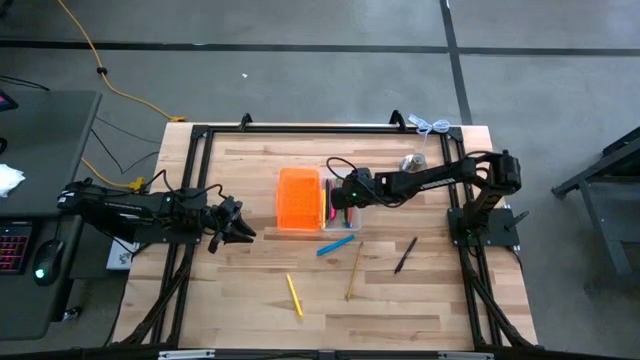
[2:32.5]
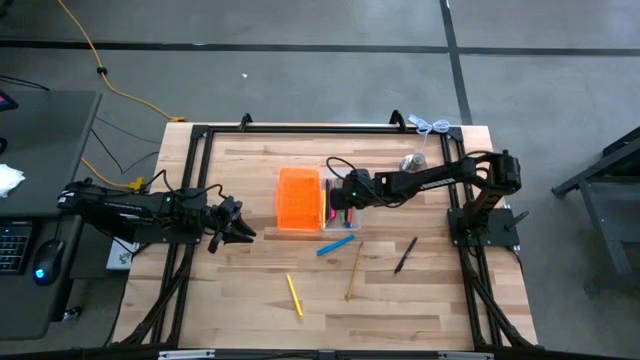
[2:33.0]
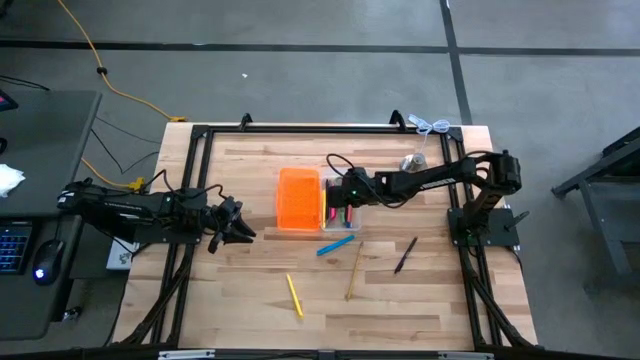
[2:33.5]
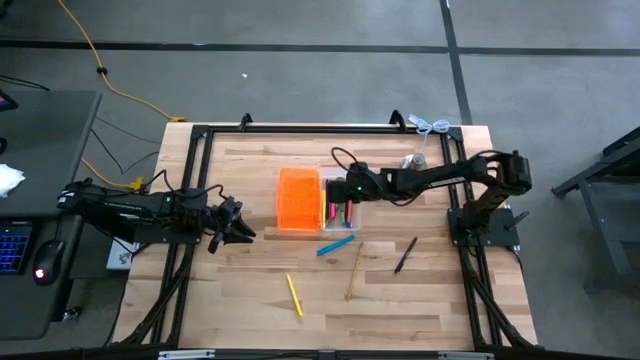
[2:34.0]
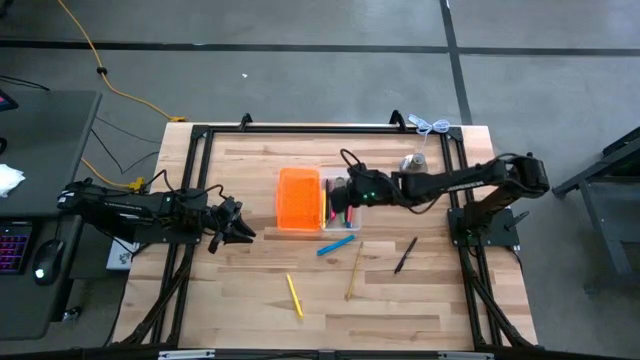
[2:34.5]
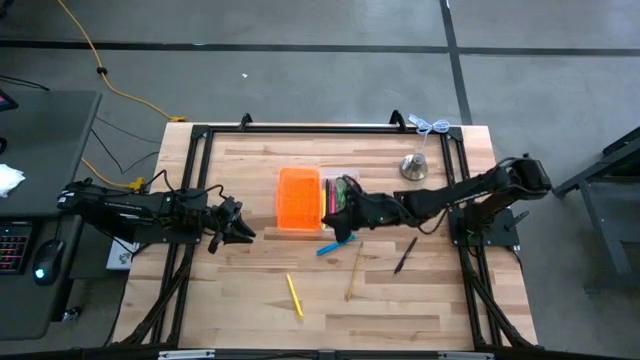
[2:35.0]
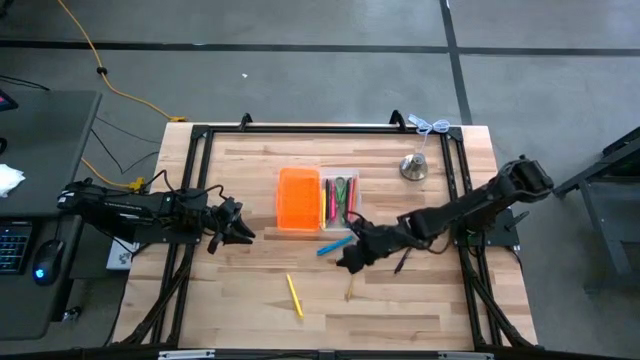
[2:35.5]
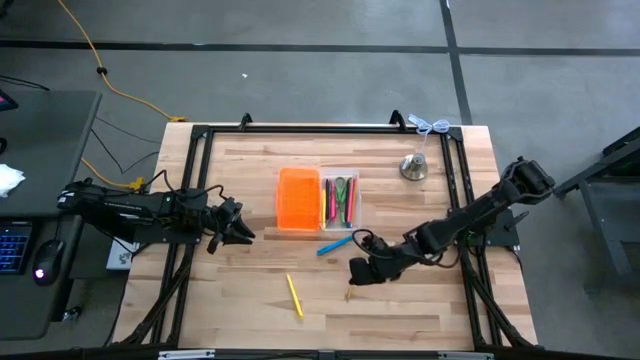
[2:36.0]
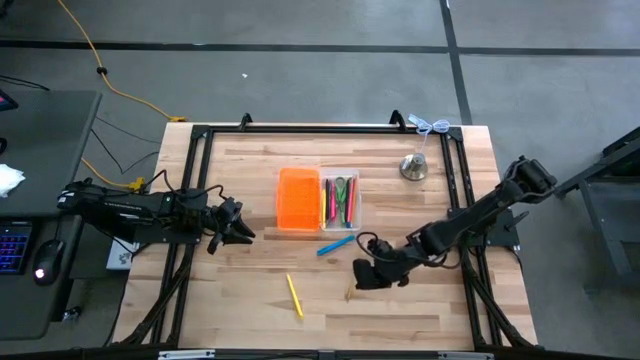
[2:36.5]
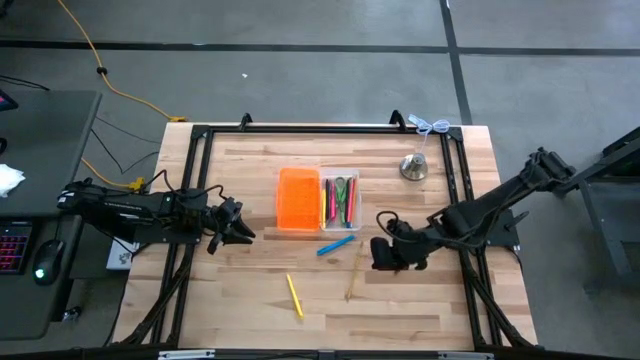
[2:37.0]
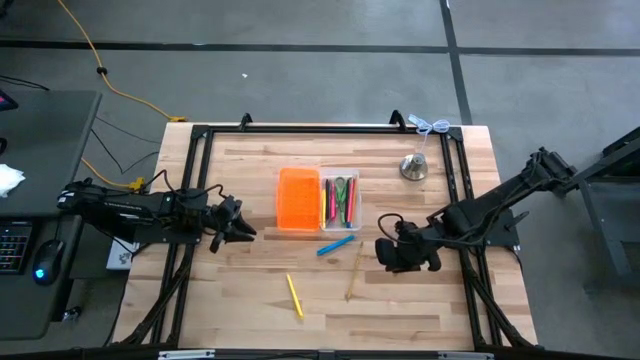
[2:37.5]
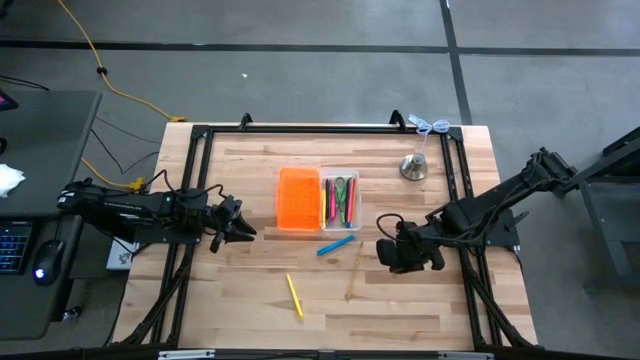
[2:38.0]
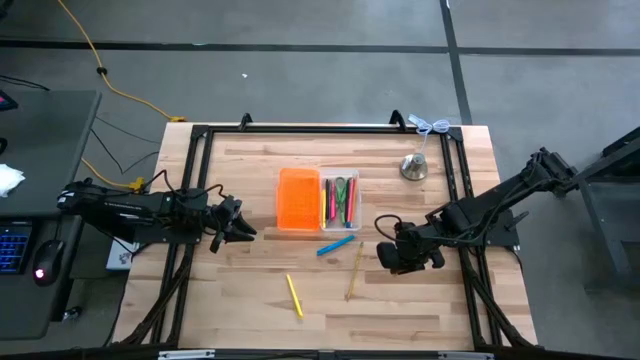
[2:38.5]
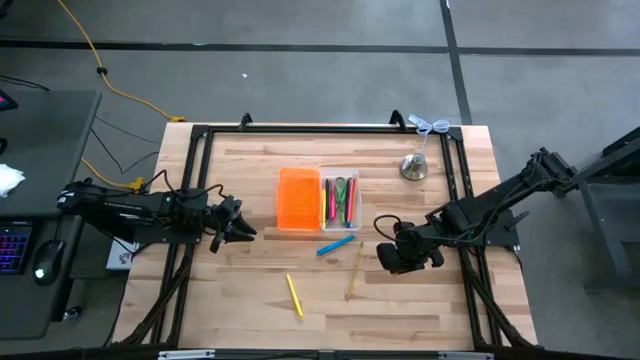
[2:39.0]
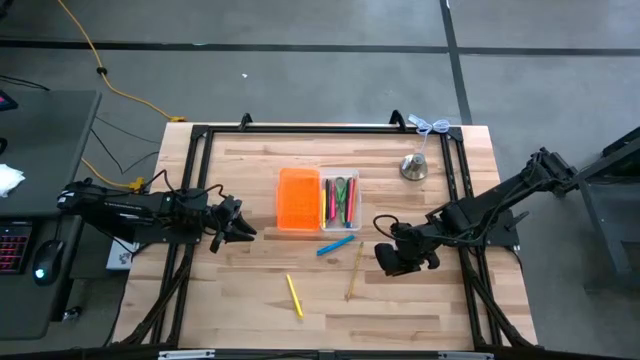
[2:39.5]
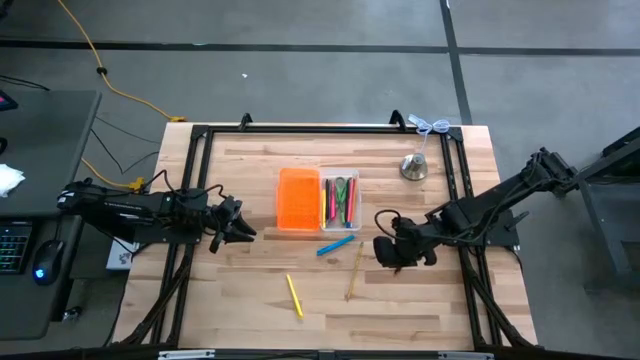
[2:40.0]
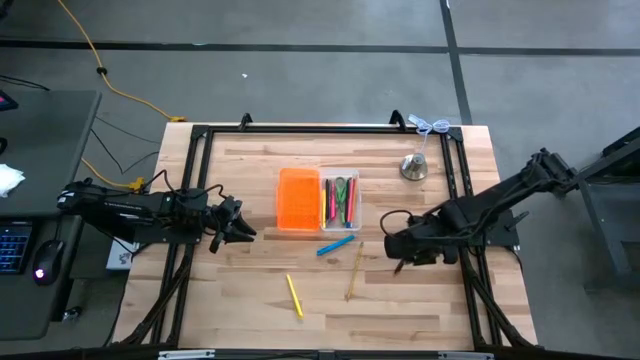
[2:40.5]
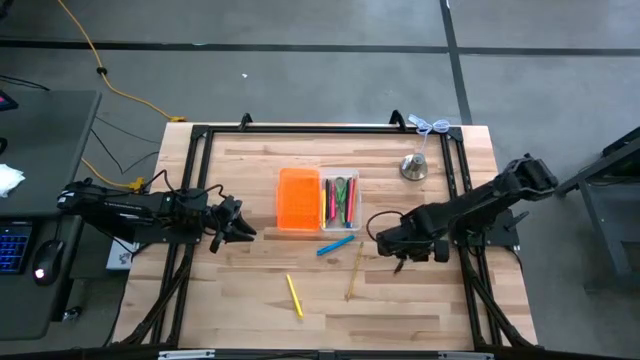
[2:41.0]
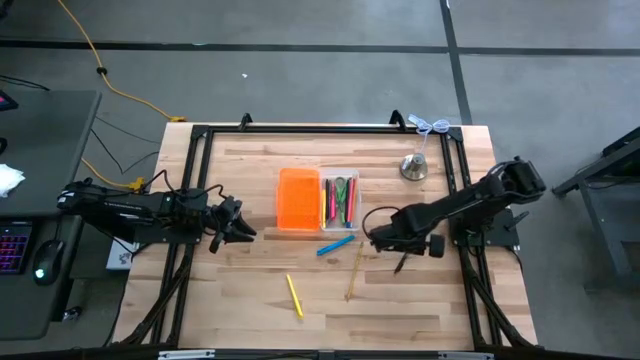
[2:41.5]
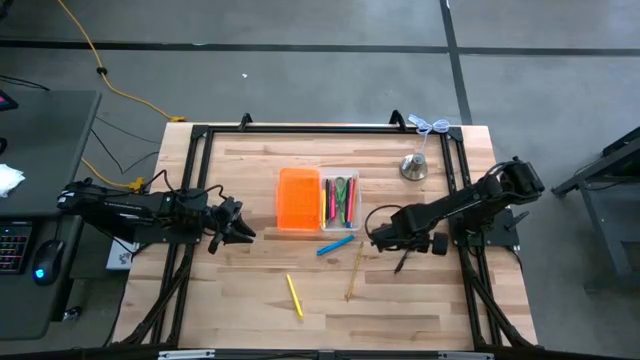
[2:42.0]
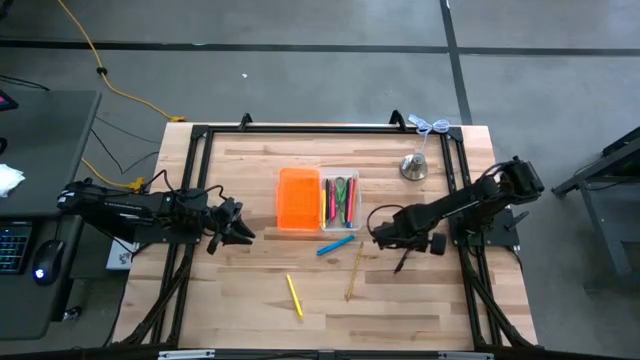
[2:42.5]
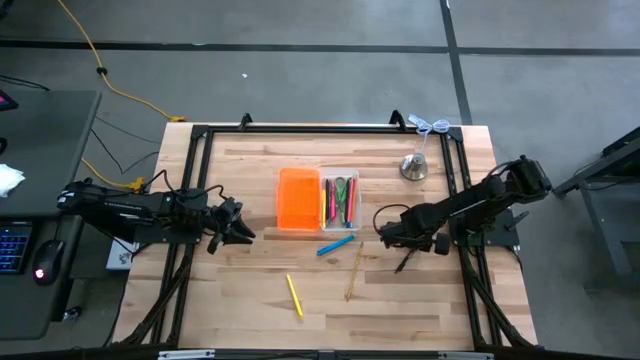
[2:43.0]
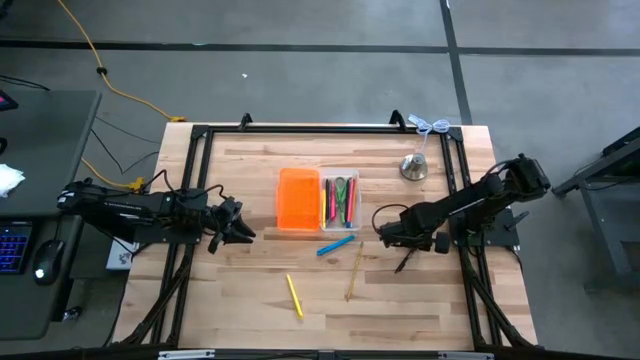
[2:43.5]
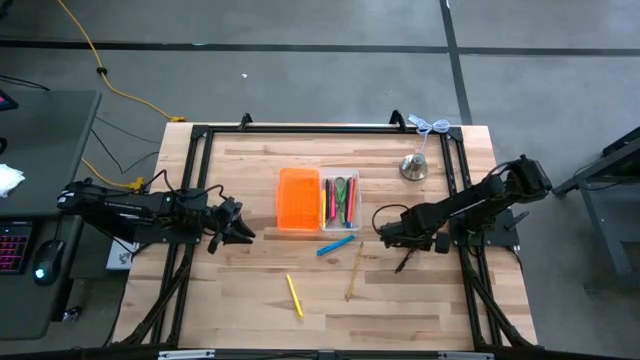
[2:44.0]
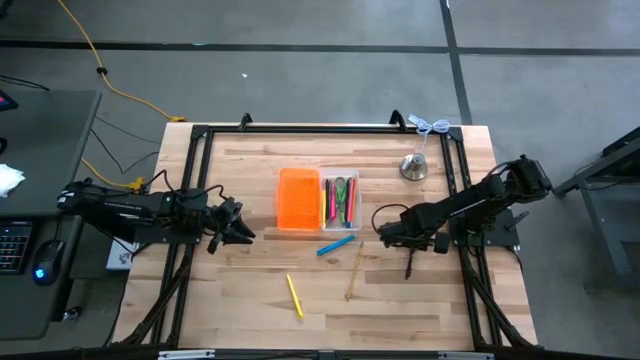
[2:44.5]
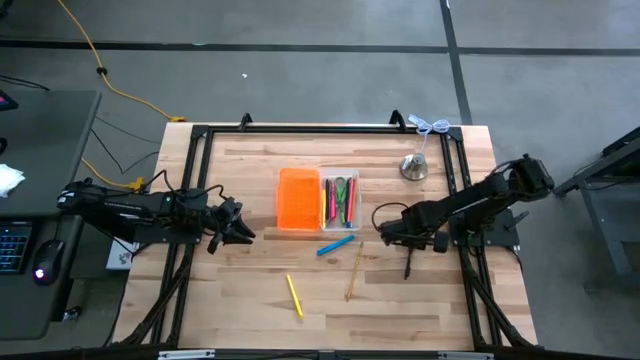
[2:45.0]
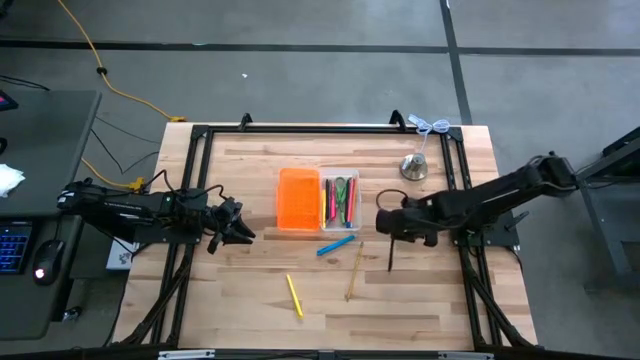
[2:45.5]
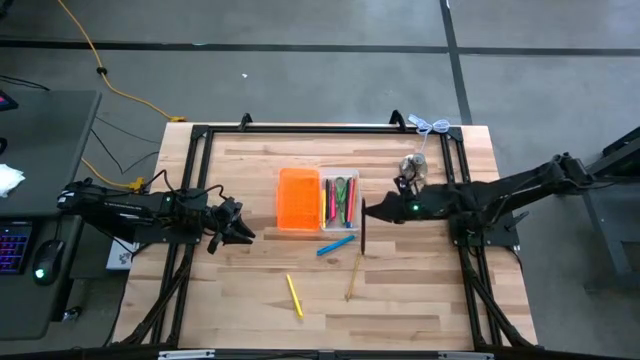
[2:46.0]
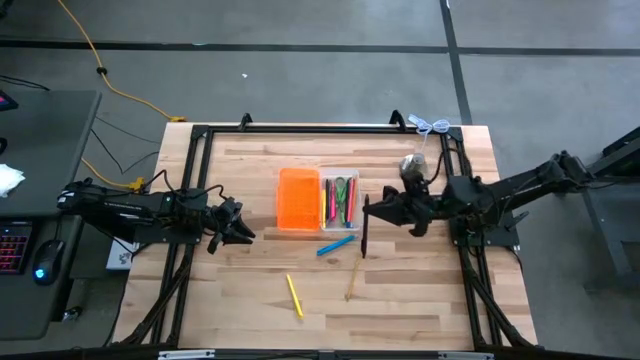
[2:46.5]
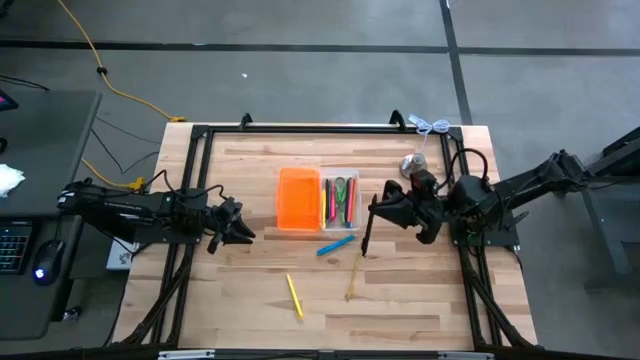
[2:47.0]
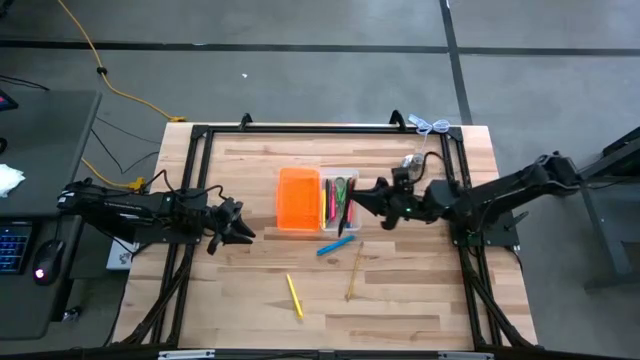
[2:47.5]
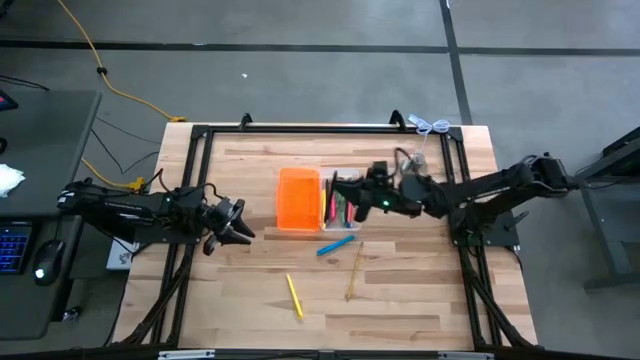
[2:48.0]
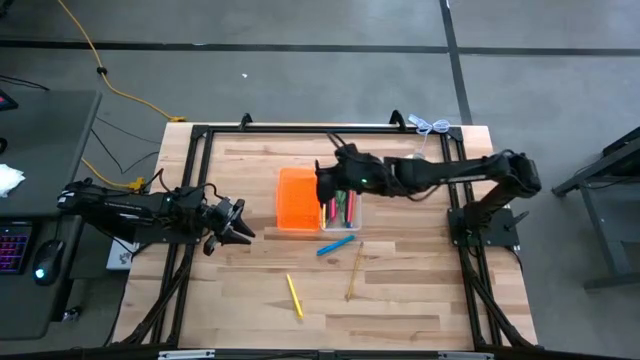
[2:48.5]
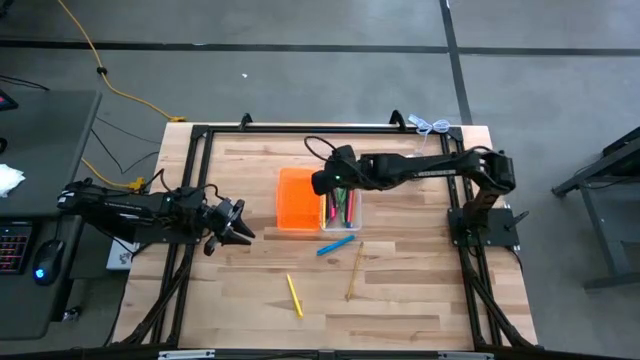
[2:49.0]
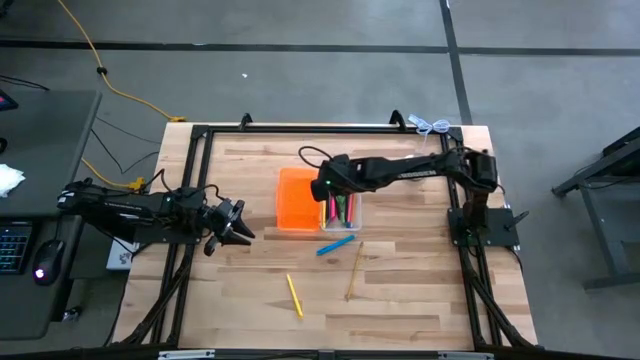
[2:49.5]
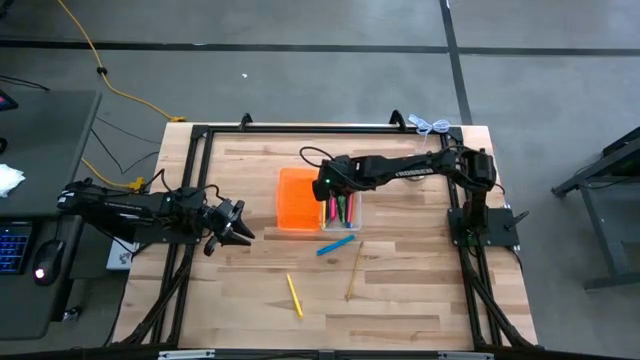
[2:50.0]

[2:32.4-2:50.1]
Task: Pick & place school supplies into a supply box
Put the black pen into the supply box

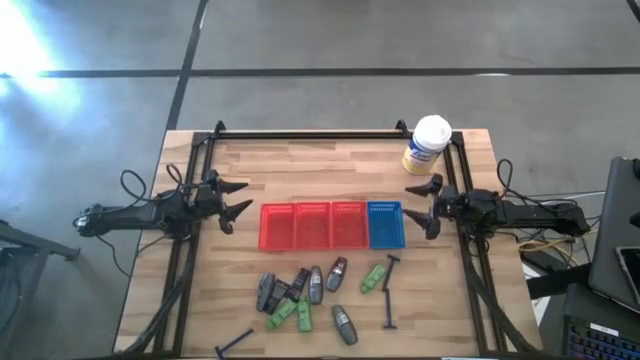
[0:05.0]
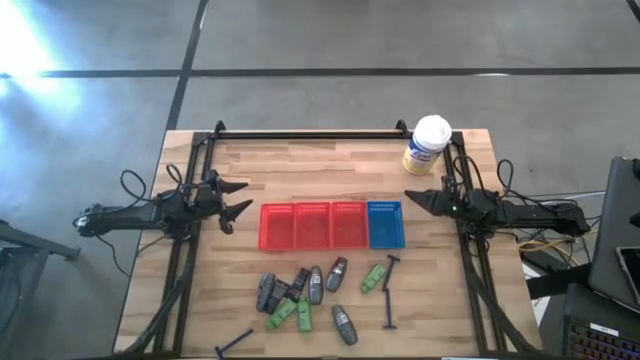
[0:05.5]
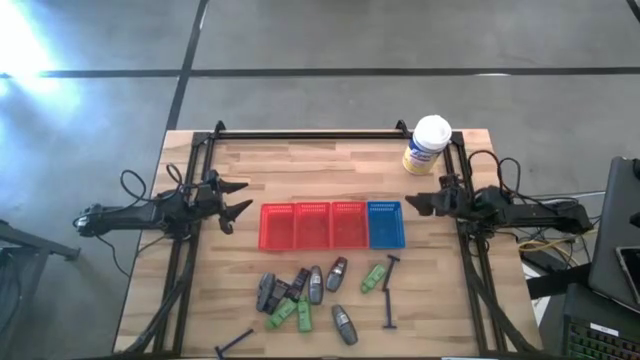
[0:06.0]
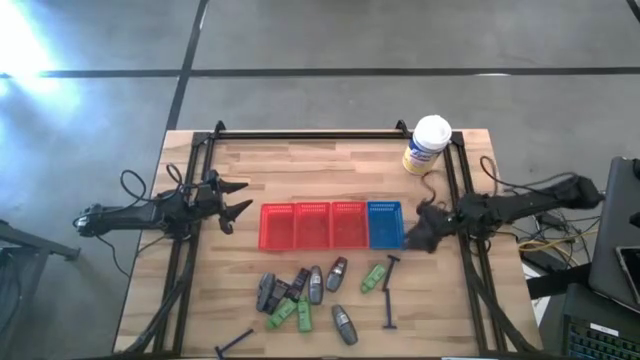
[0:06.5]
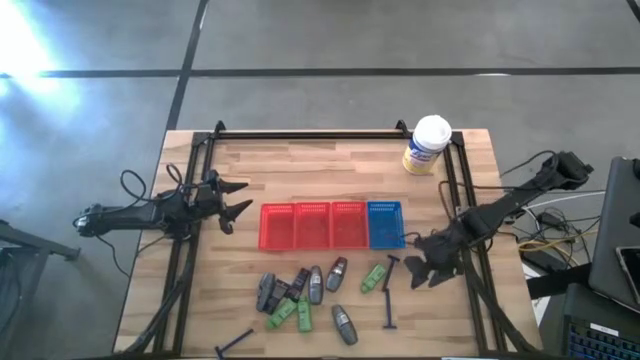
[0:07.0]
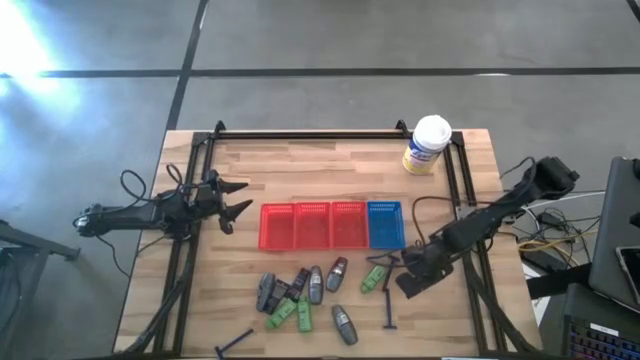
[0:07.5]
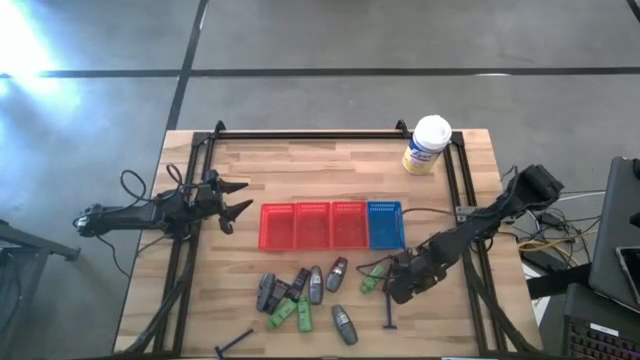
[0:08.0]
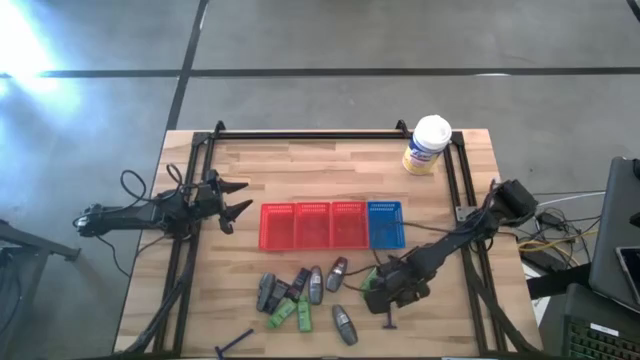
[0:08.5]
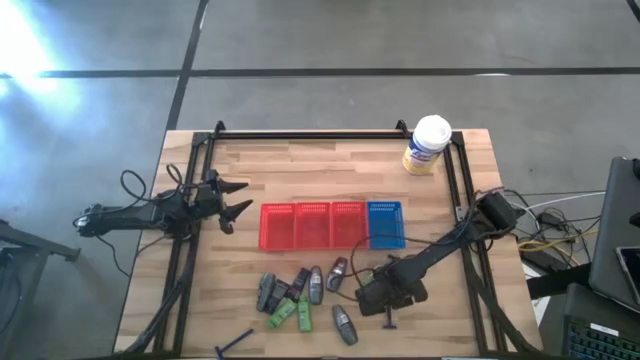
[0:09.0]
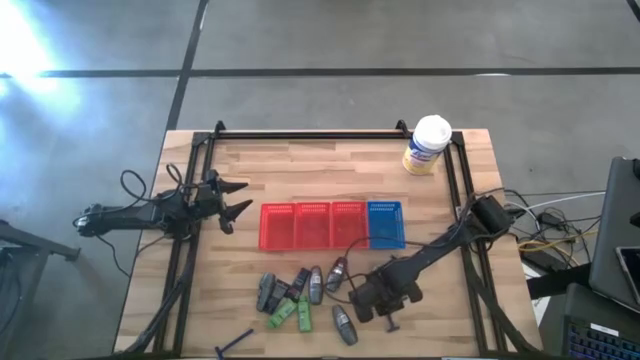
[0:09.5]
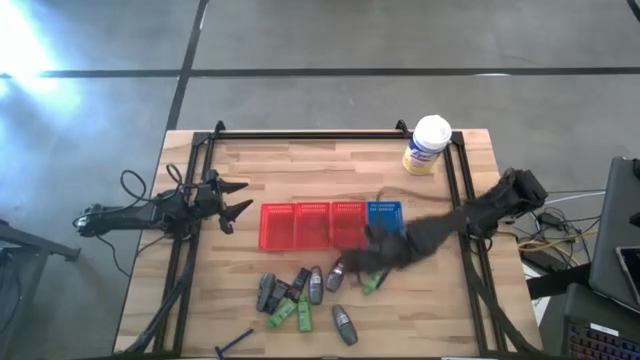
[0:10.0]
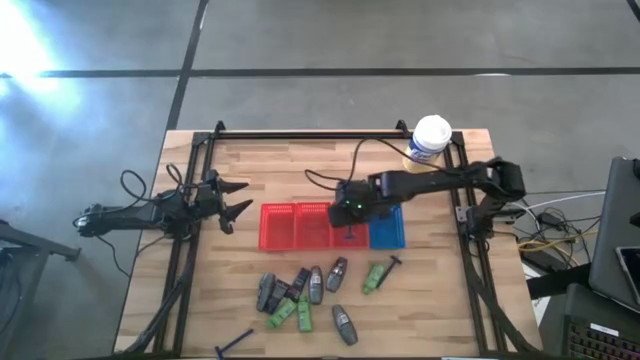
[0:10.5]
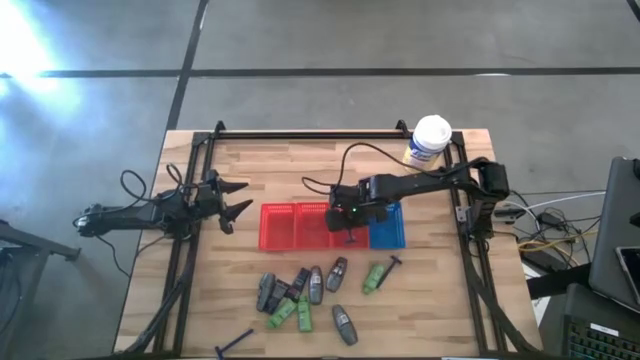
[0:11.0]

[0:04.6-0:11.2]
Task: Pick & Place Travel size toiletries
Put the blue razor into the right red bin
